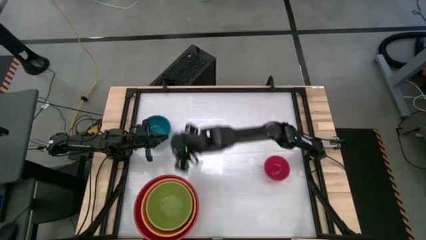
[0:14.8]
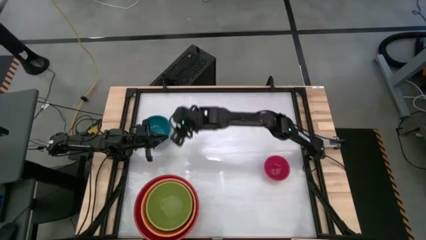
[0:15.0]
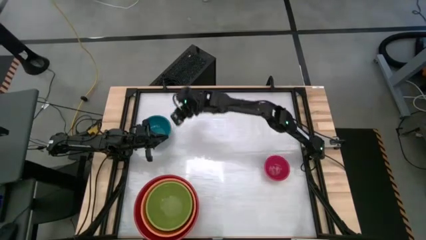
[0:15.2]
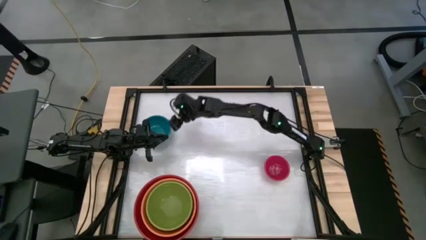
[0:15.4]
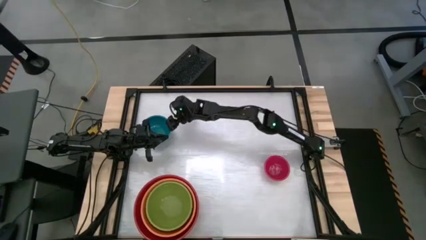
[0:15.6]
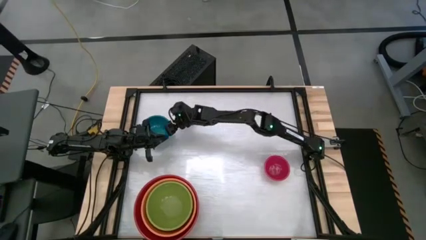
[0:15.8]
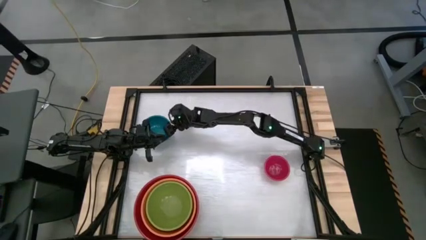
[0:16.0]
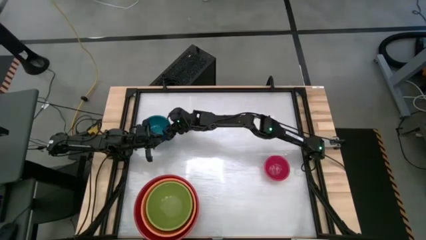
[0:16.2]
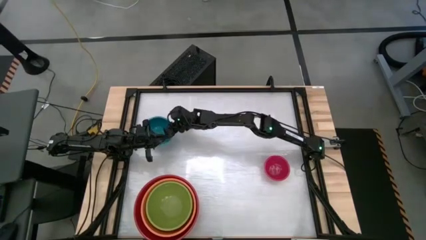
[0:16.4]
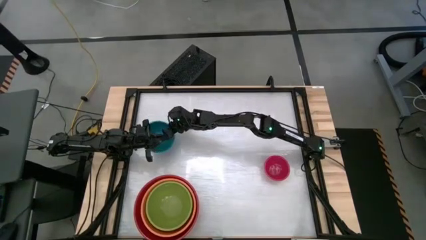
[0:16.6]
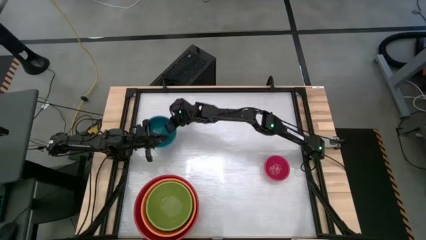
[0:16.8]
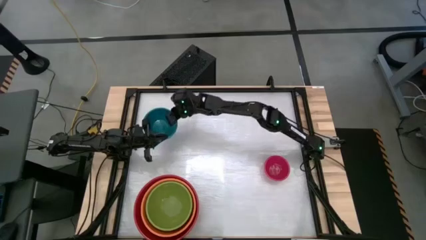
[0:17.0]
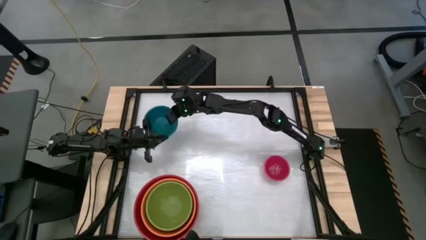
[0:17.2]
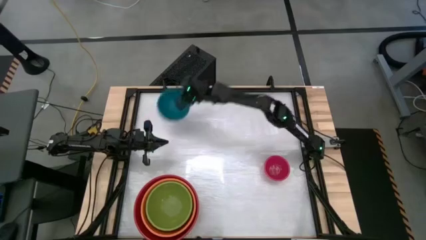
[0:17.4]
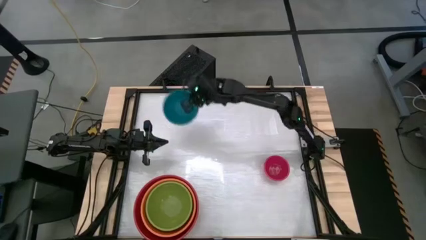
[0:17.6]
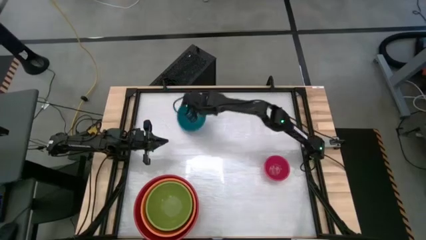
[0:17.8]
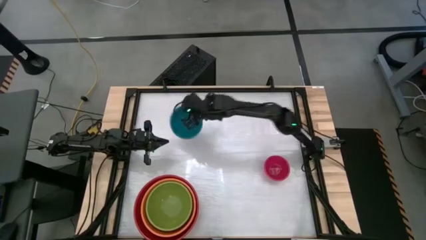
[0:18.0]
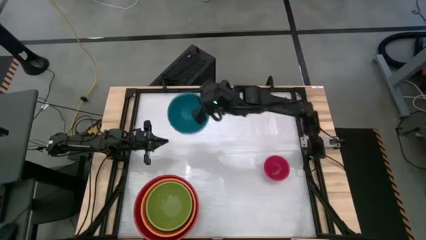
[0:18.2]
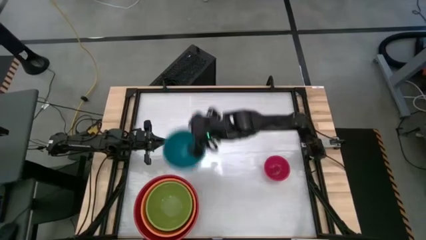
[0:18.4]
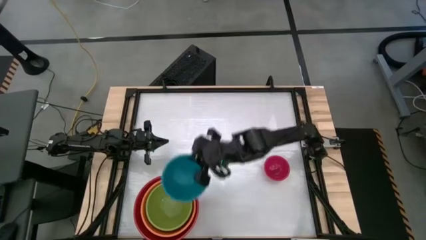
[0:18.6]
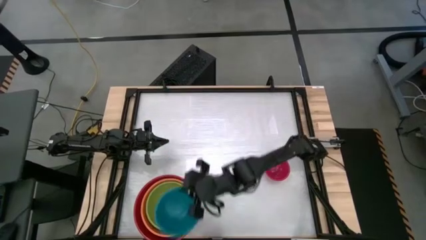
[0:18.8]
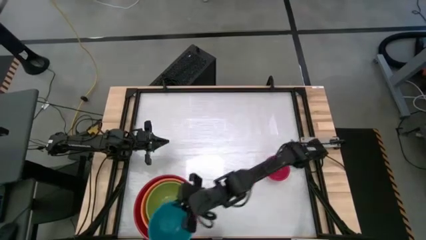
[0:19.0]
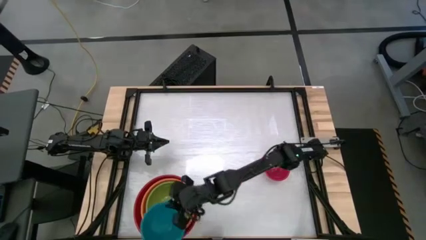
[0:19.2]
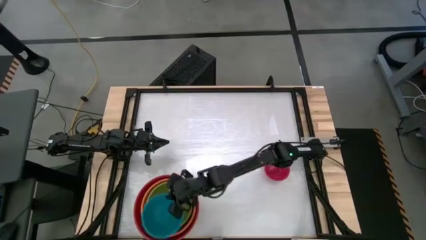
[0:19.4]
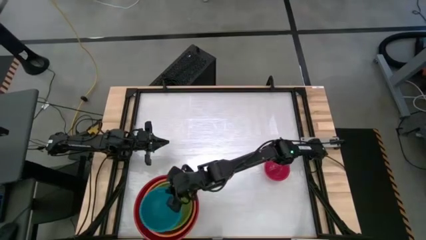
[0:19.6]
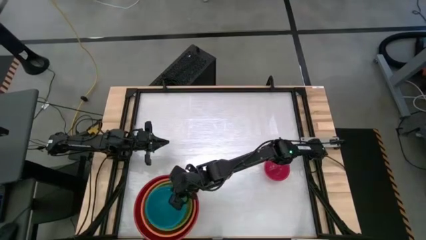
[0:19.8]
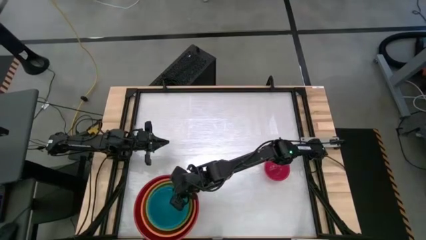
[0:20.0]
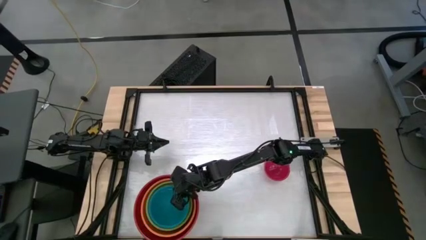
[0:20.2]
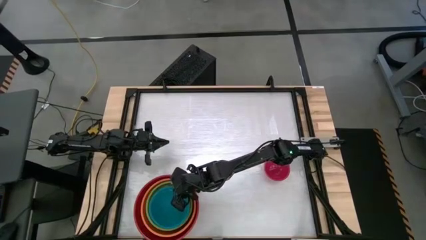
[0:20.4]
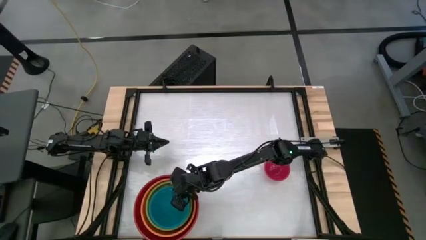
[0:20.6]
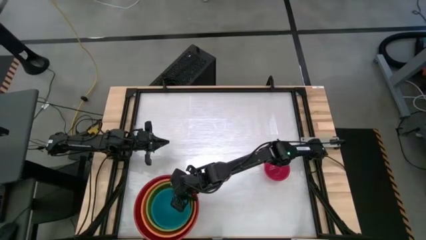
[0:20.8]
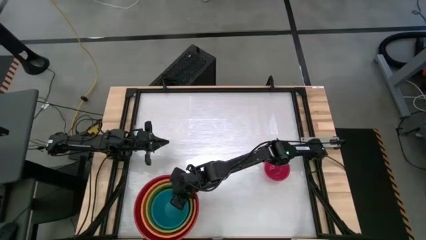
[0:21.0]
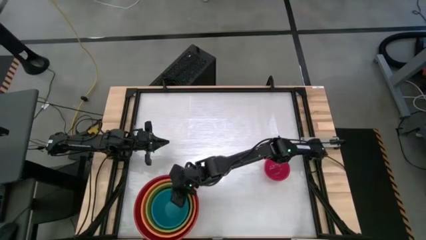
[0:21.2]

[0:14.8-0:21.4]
Stack the blue bowl on the green bowl

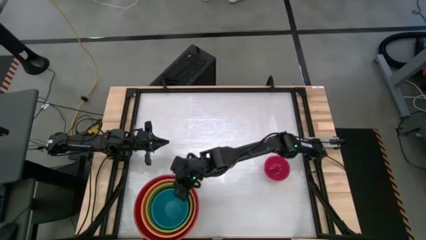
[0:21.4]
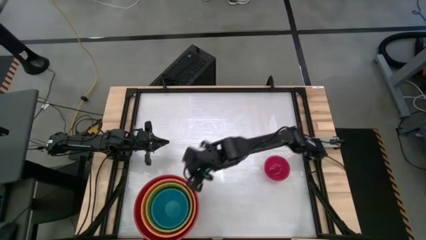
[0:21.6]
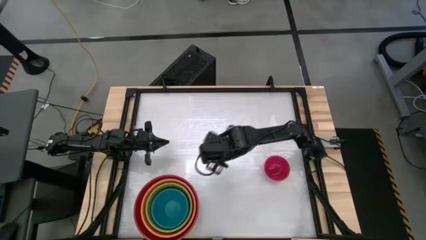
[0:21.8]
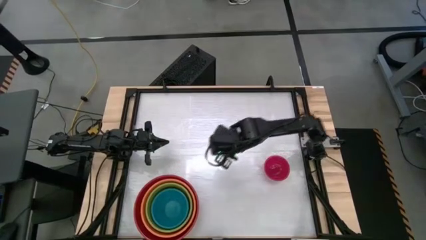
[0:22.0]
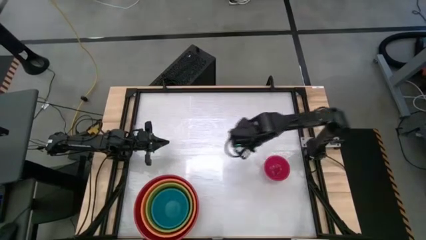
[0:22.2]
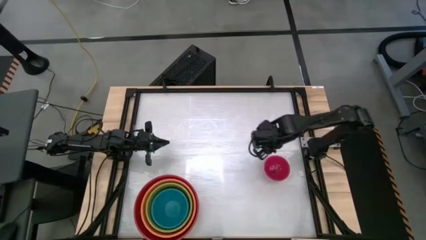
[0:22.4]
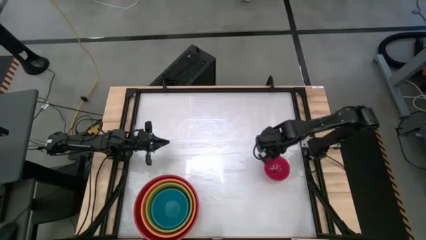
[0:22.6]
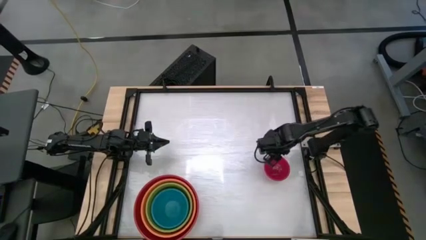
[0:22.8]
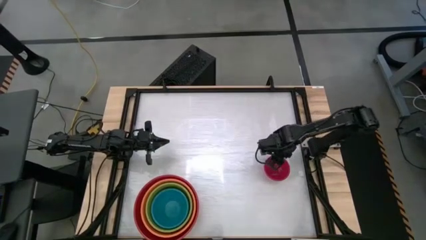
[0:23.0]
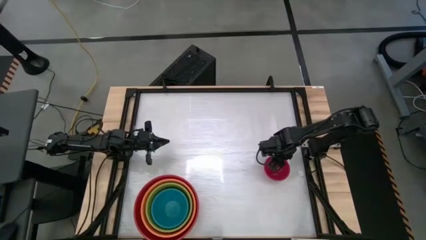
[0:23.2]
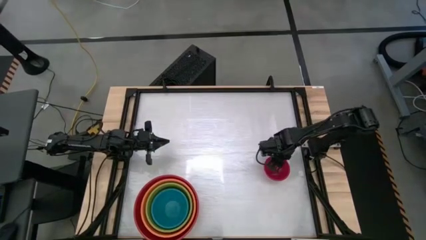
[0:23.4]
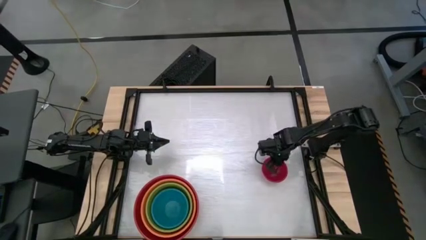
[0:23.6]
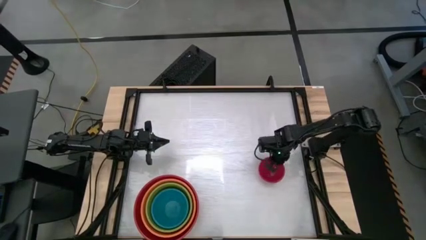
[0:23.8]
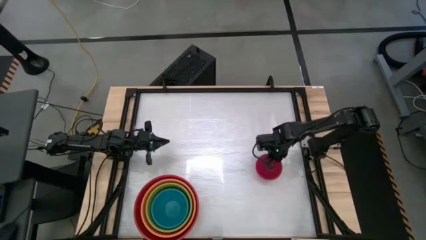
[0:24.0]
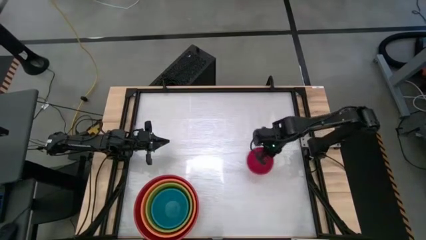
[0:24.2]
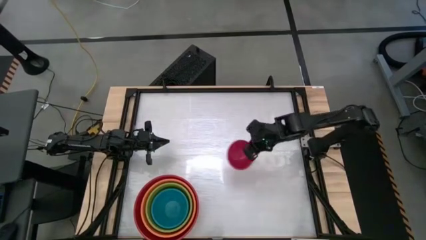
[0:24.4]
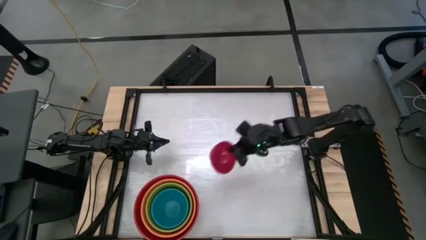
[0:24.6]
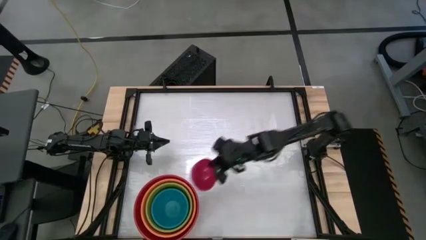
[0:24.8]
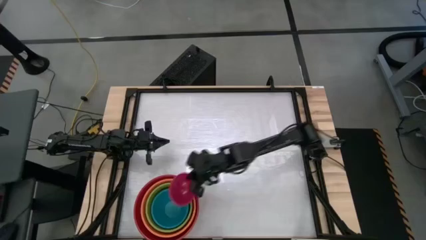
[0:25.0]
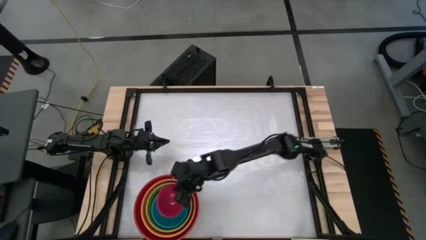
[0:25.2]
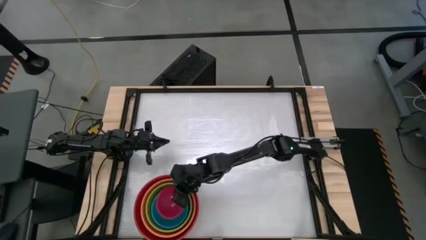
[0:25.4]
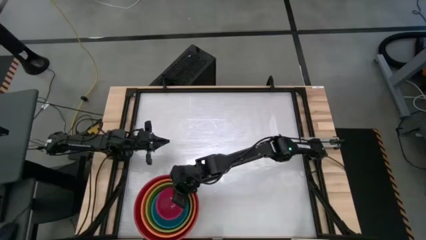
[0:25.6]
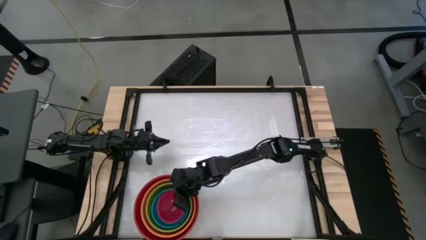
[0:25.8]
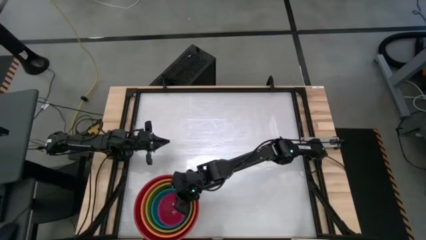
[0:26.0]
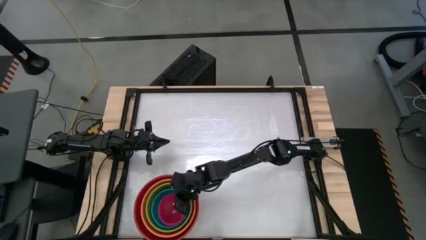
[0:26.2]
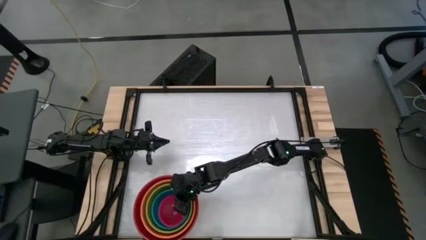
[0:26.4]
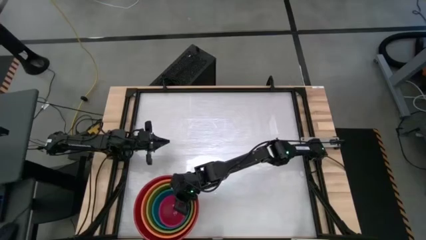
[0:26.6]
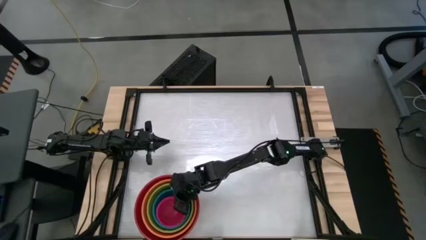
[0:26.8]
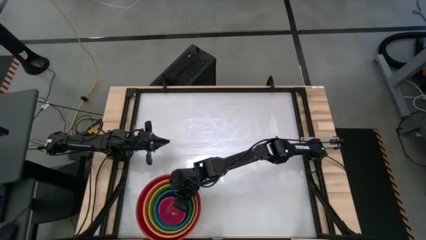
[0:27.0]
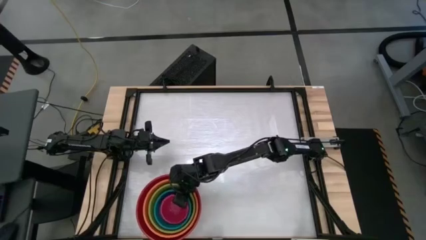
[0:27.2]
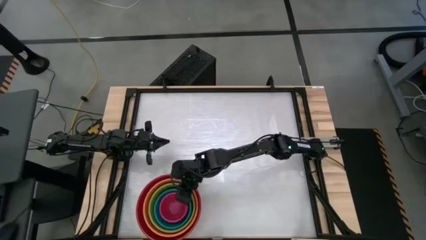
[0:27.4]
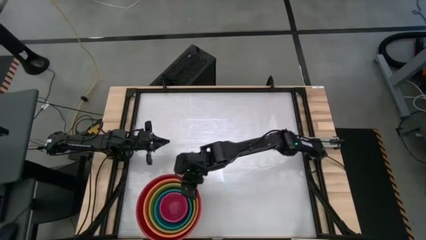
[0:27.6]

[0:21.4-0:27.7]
Stack the red bowl on the blue bowl

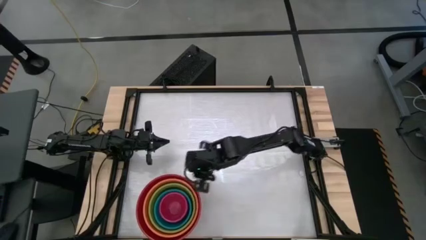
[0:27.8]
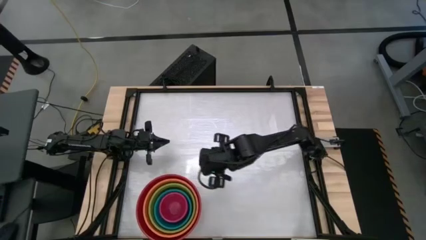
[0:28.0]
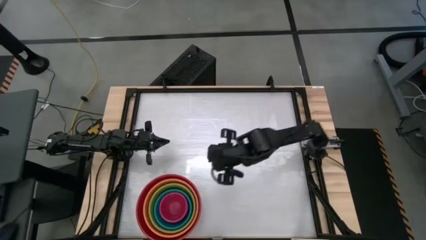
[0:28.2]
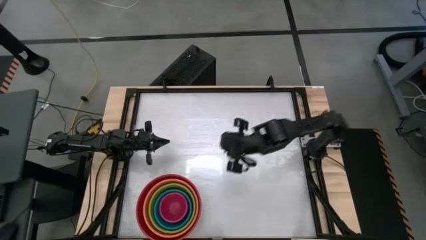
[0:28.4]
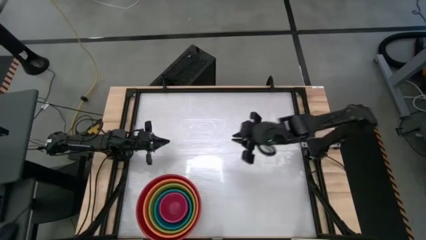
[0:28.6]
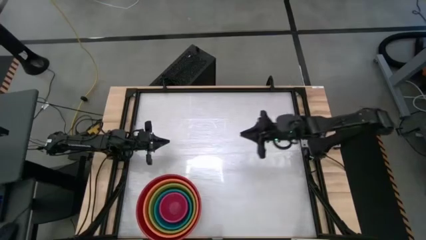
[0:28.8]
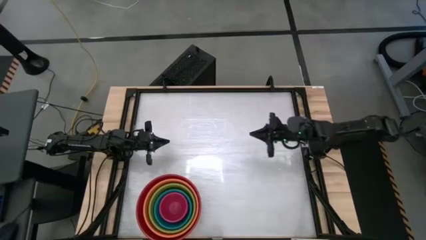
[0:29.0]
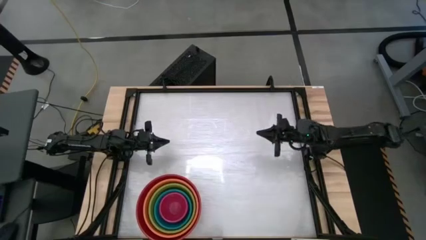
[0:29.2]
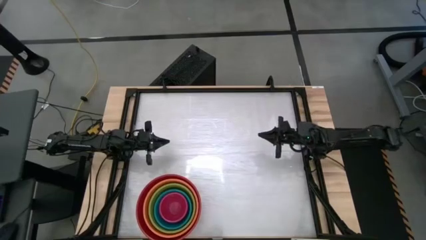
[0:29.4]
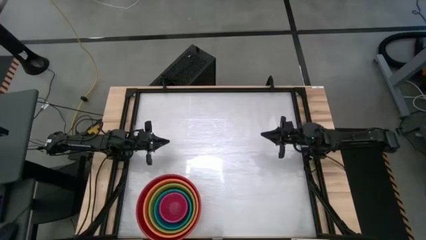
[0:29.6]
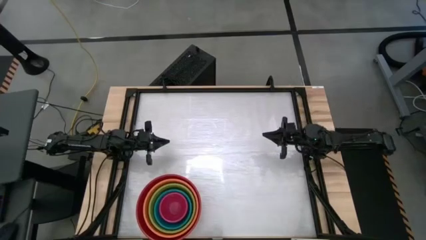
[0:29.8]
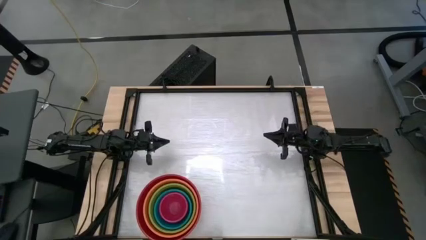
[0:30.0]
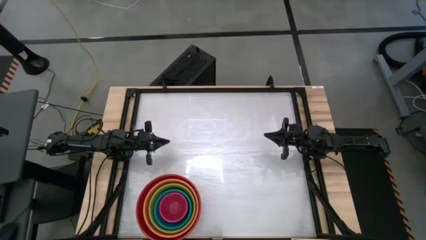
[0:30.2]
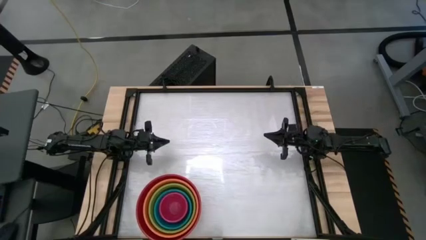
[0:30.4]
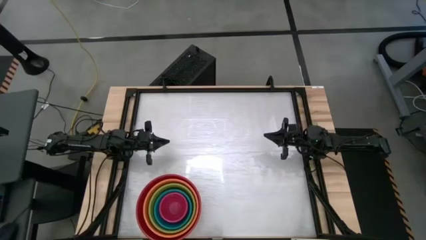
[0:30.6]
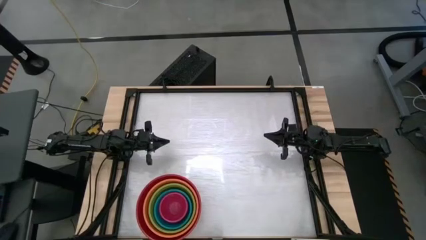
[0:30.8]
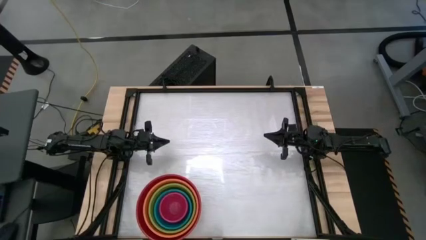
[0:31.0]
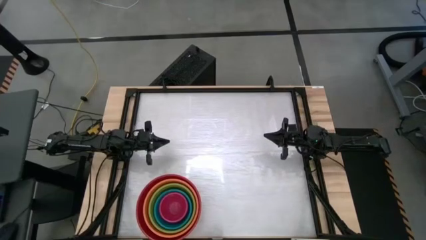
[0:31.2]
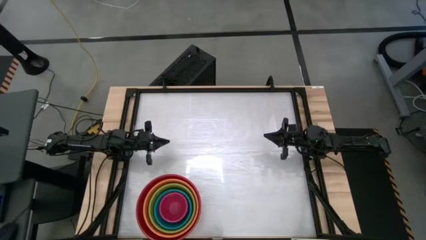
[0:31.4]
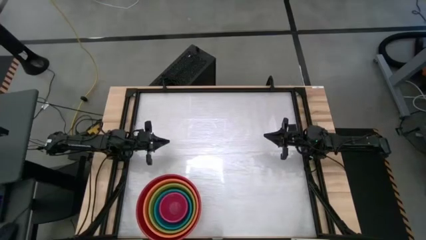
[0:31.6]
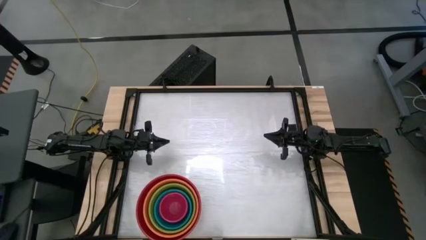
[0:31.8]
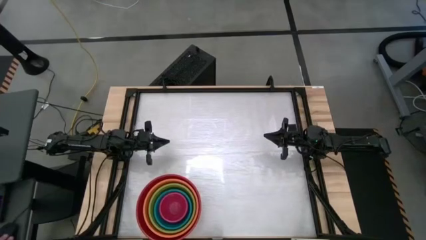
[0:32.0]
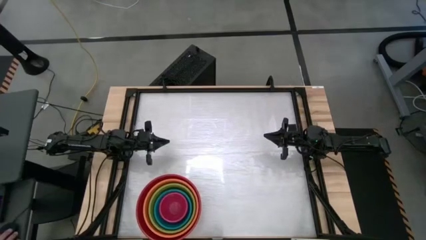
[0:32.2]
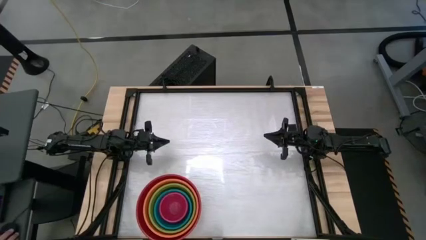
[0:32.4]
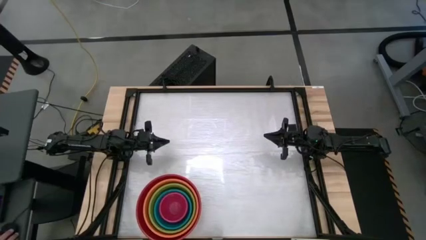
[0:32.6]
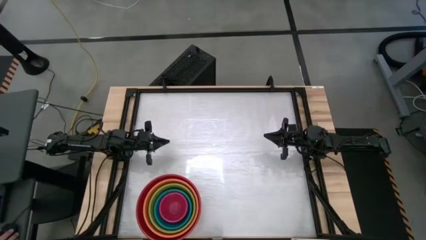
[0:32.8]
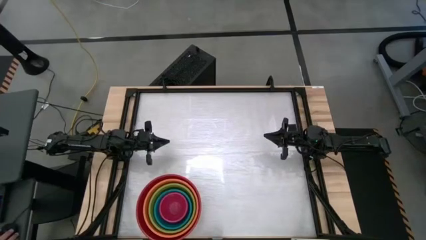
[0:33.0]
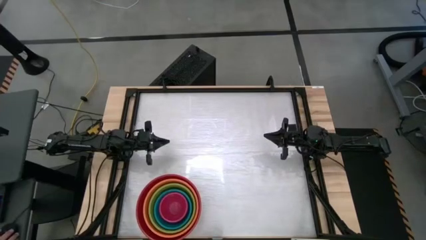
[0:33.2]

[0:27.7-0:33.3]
Return to Home Position
